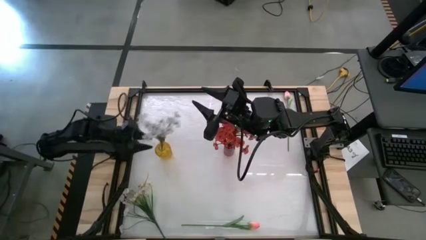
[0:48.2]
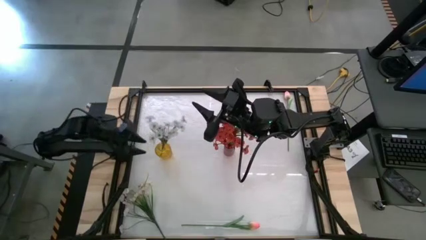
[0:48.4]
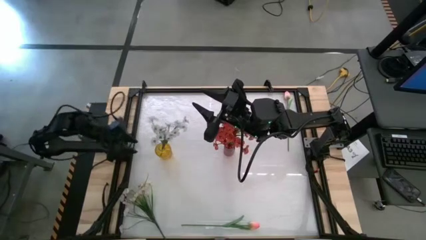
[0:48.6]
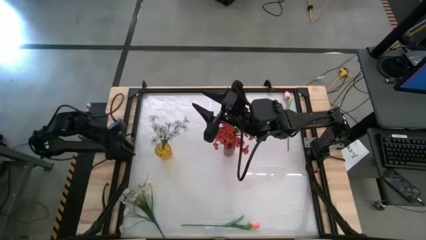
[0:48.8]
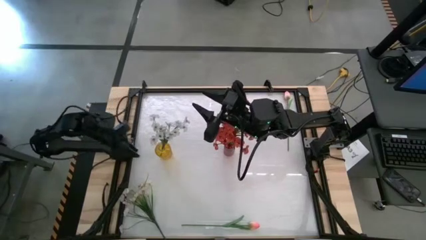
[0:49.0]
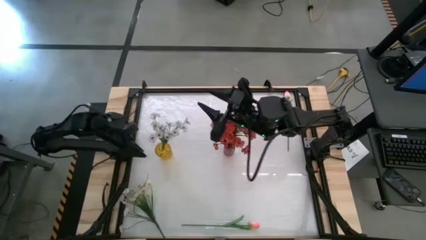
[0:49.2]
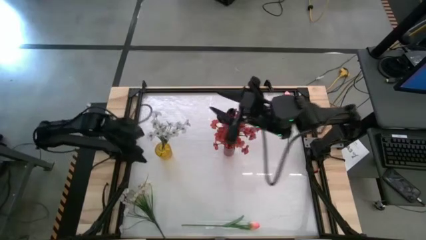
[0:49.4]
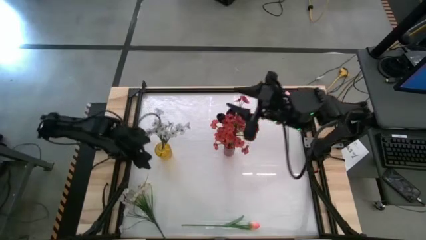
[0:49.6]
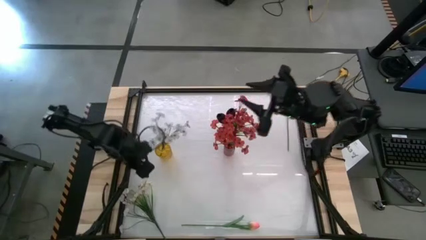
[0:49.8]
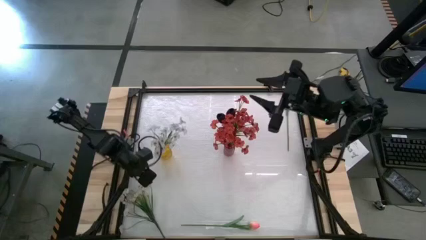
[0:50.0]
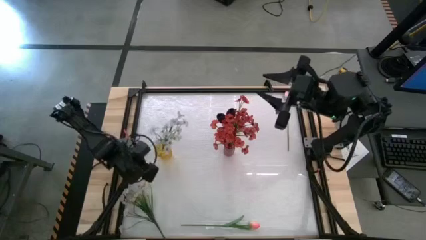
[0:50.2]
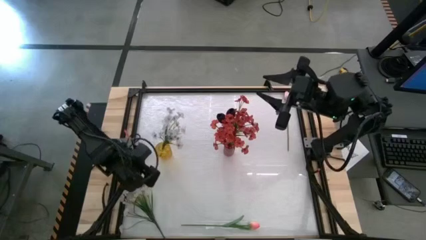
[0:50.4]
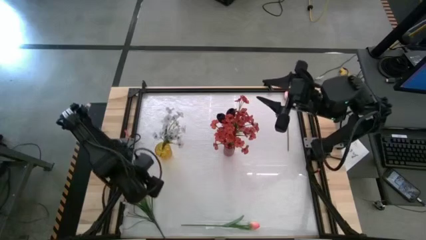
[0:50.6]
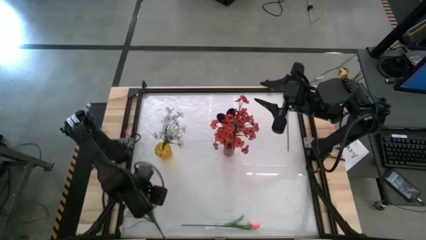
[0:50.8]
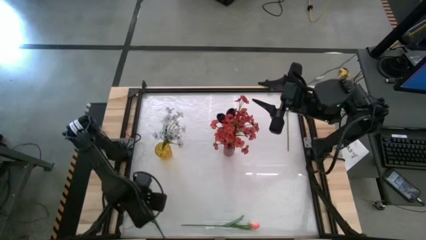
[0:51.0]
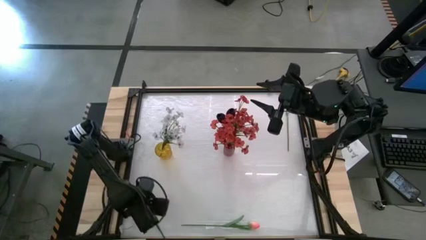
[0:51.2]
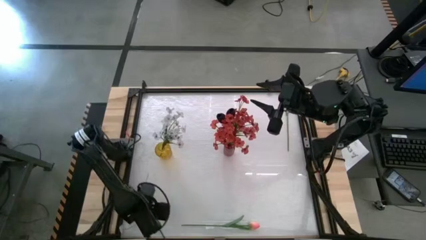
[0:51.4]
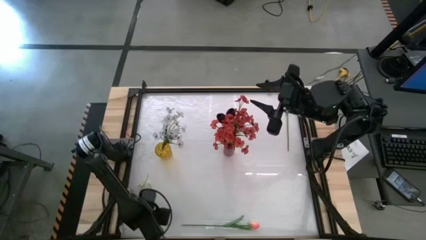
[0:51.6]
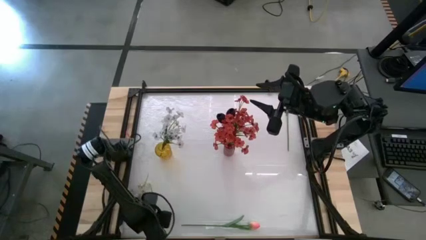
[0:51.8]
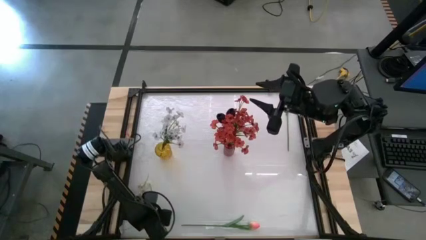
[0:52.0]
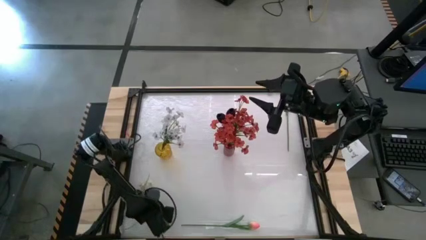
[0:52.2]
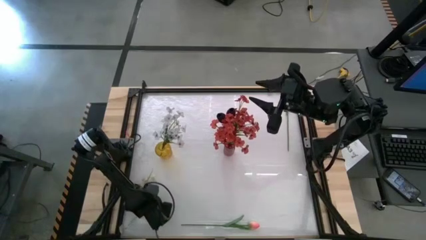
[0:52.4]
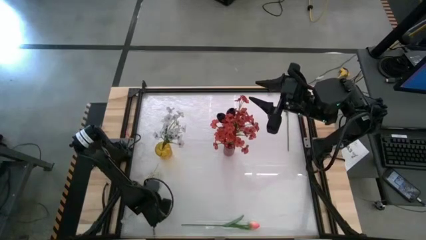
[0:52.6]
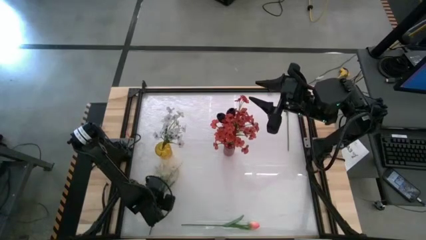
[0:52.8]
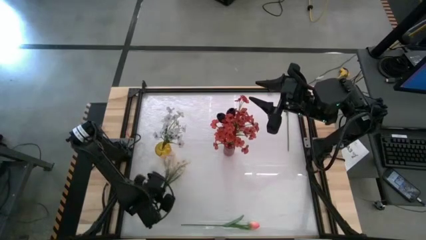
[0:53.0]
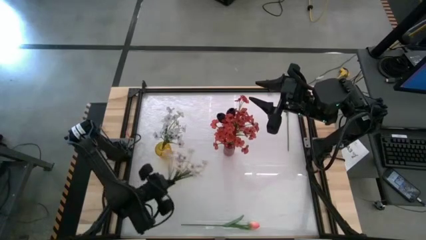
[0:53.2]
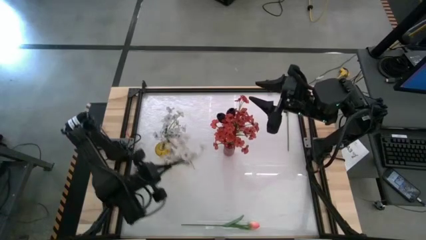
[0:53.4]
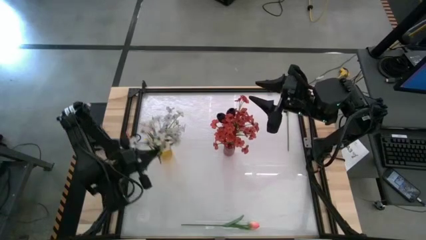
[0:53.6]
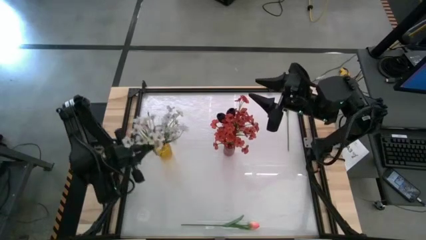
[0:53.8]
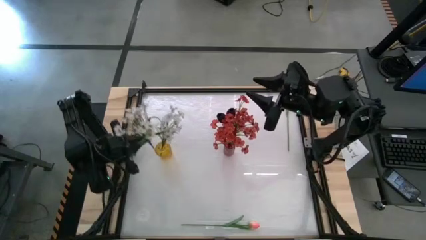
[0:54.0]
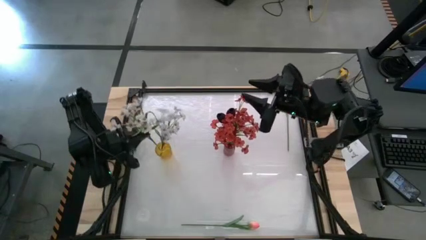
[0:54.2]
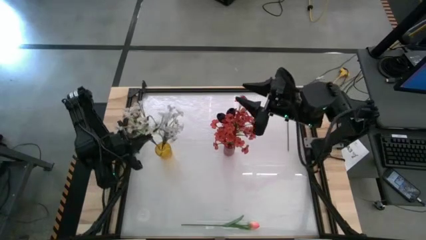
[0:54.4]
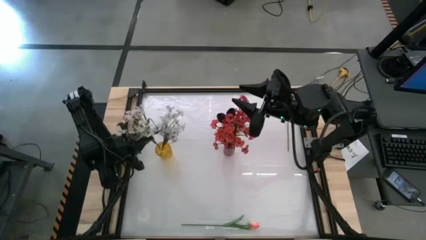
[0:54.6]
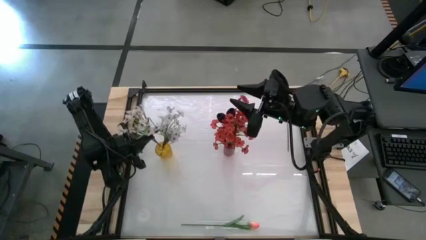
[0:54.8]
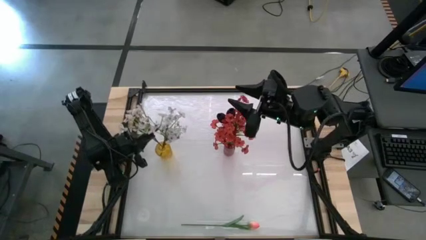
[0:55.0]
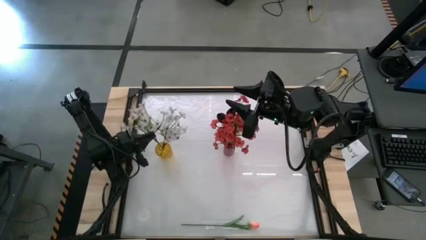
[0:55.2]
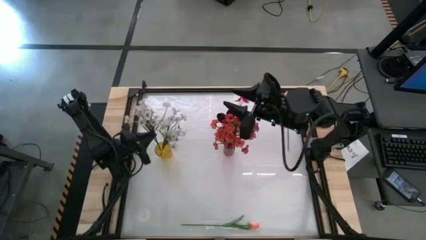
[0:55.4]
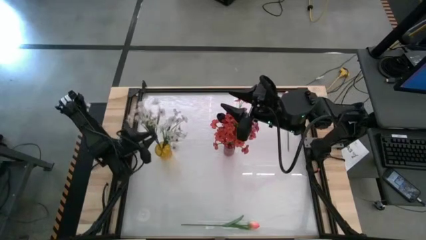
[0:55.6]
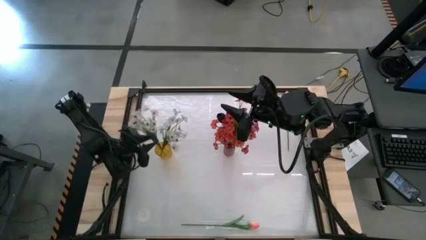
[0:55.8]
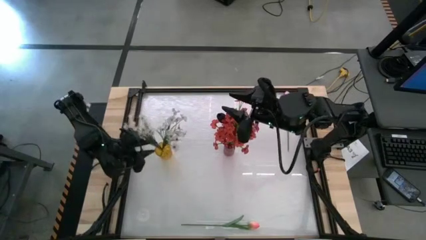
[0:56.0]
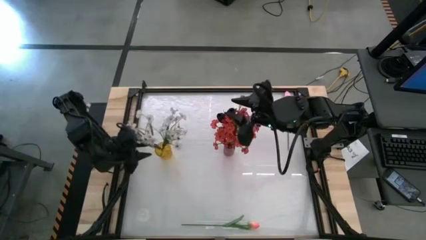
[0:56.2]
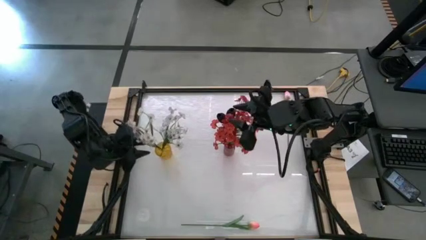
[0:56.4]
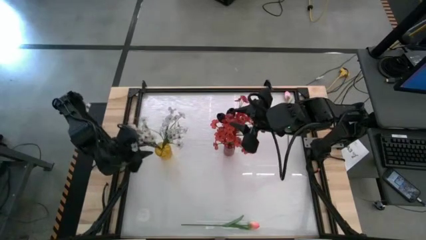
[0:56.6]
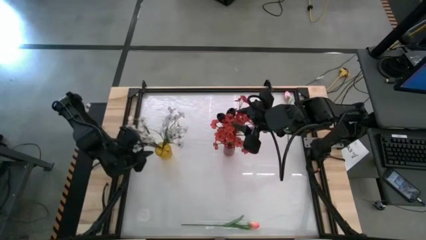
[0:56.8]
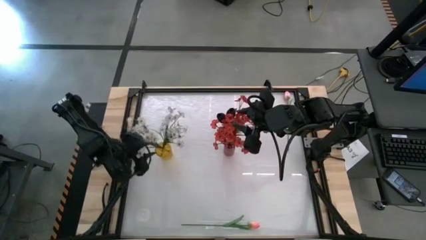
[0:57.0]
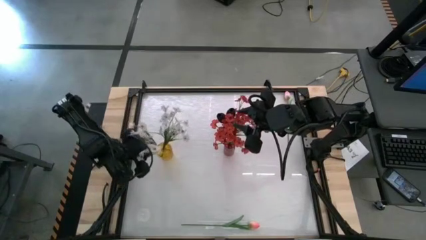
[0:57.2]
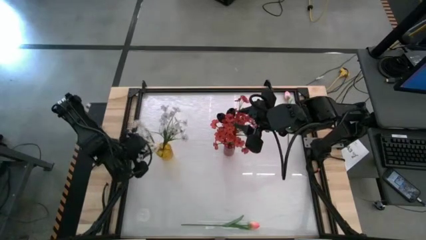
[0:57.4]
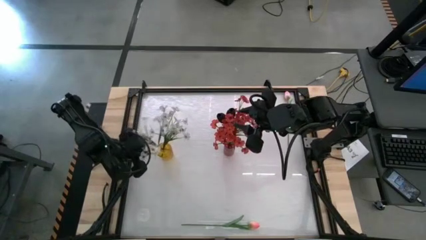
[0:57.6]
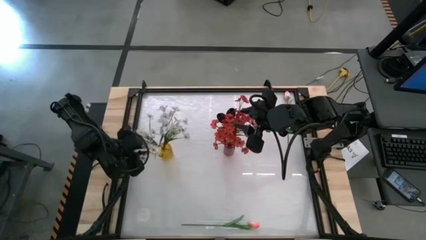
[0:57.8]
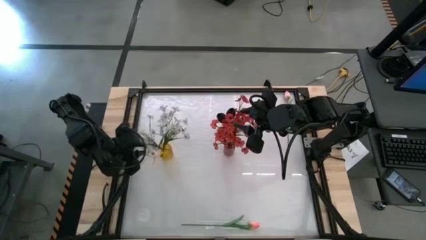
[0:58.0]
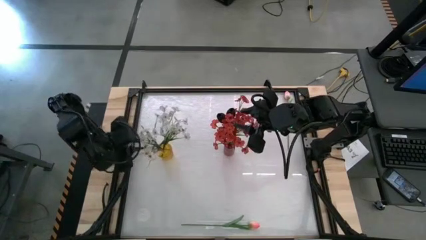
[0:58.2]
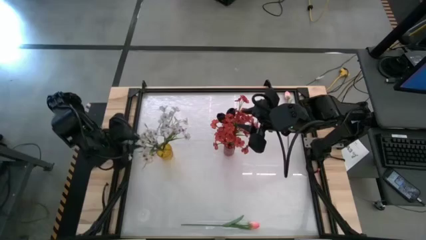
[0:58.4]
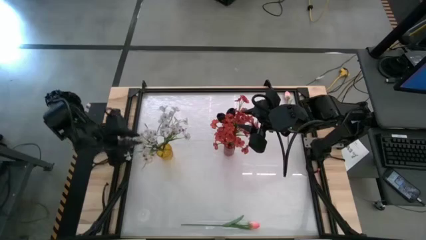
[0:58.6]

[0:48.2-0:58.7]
Task: Sort flowers into vase by color
Put the white flowers into the yellow vase

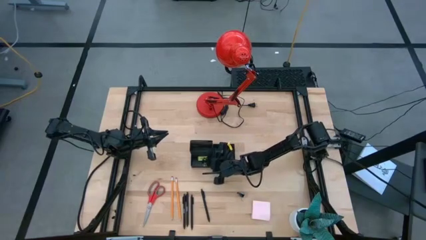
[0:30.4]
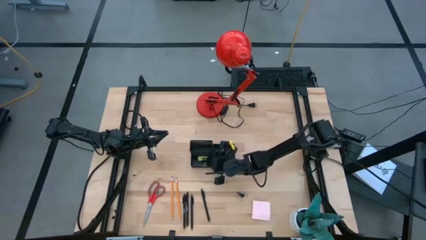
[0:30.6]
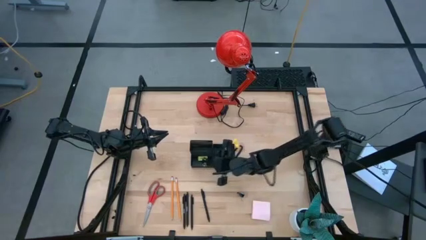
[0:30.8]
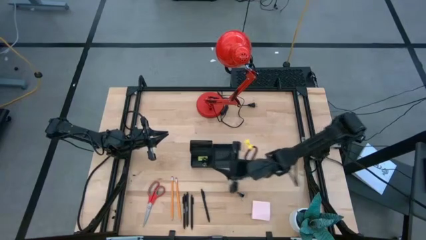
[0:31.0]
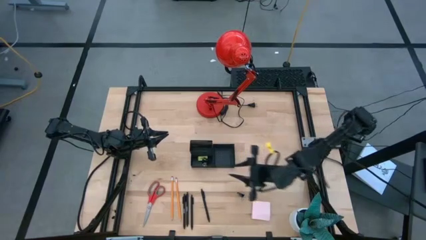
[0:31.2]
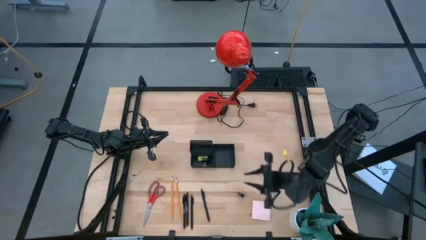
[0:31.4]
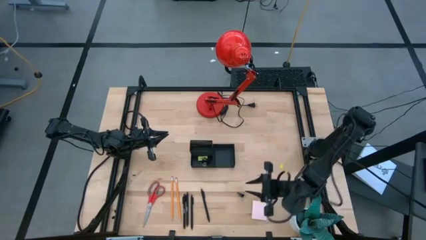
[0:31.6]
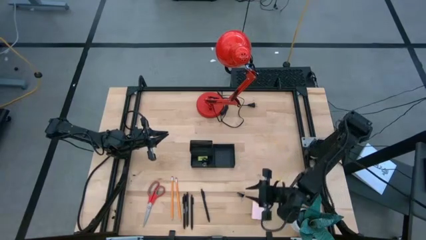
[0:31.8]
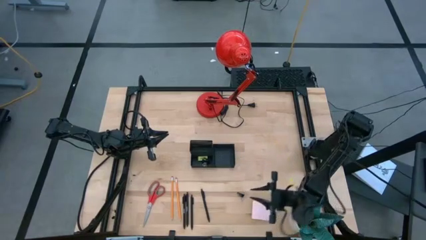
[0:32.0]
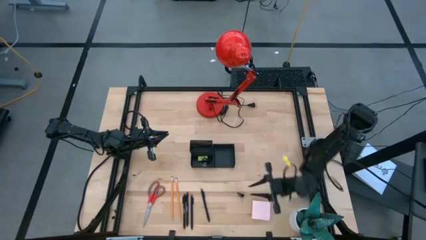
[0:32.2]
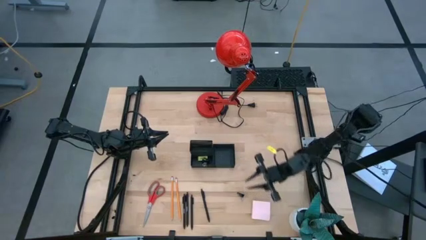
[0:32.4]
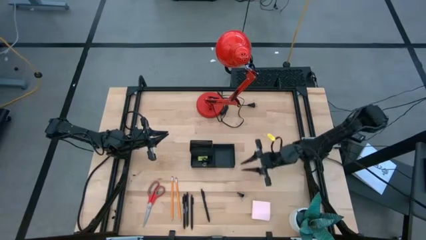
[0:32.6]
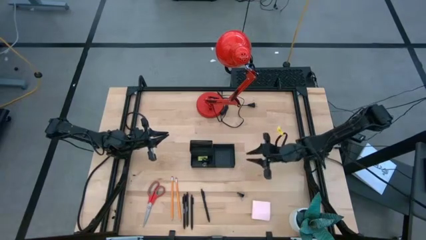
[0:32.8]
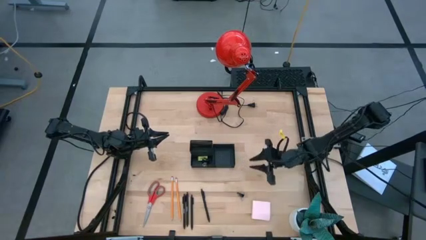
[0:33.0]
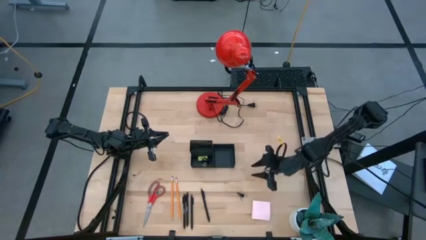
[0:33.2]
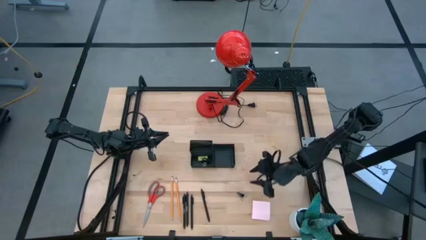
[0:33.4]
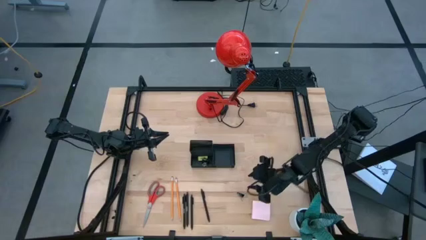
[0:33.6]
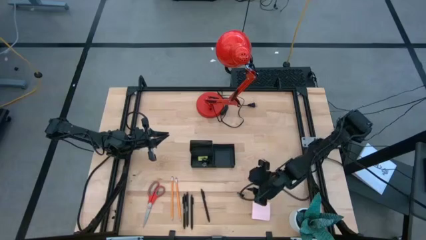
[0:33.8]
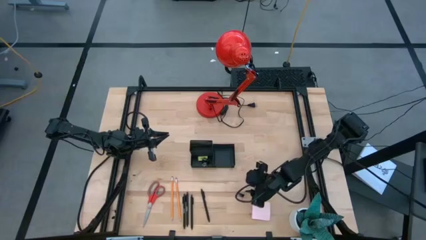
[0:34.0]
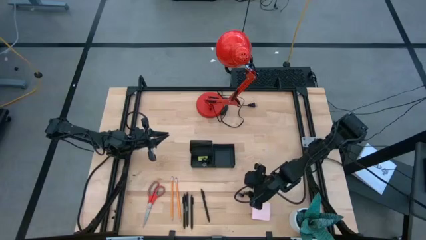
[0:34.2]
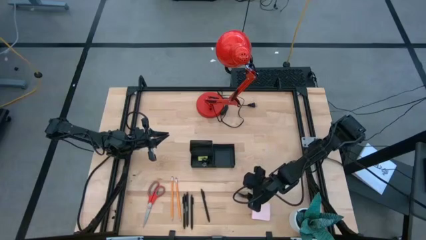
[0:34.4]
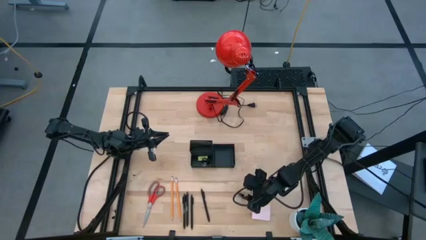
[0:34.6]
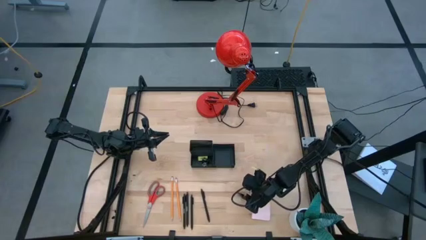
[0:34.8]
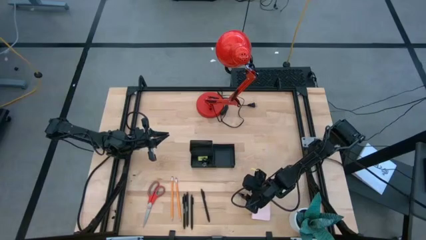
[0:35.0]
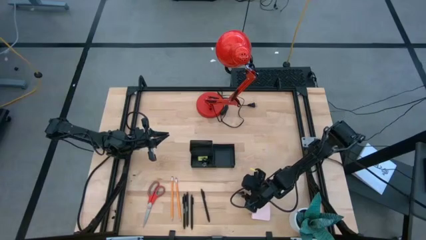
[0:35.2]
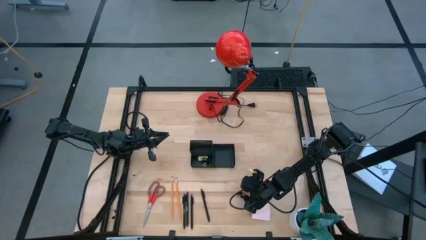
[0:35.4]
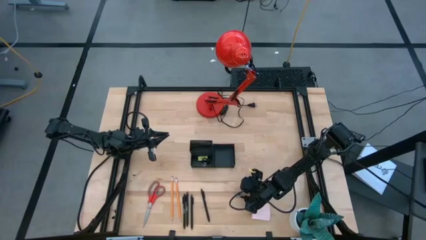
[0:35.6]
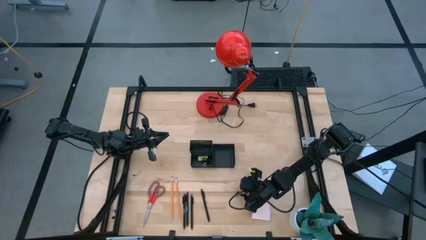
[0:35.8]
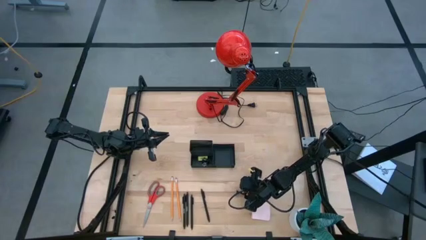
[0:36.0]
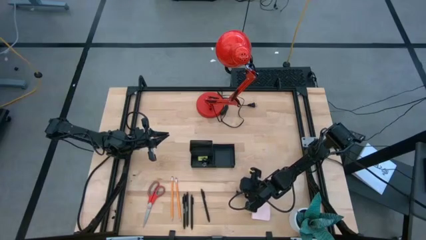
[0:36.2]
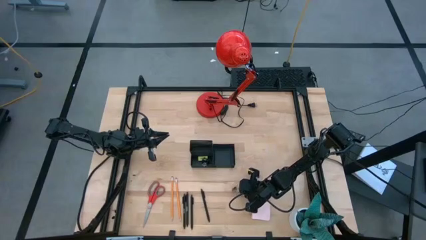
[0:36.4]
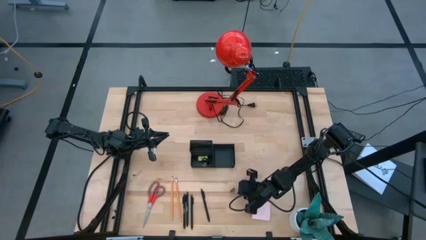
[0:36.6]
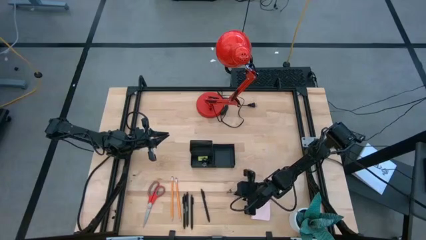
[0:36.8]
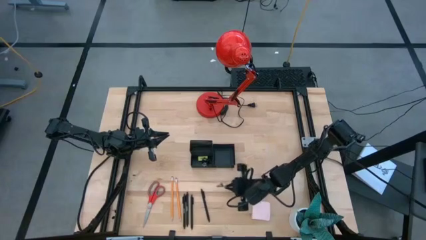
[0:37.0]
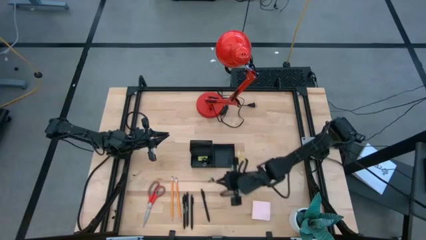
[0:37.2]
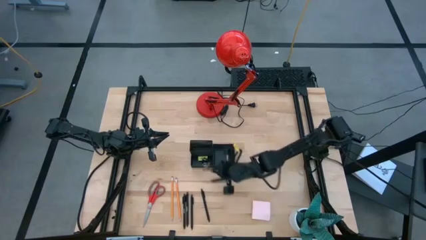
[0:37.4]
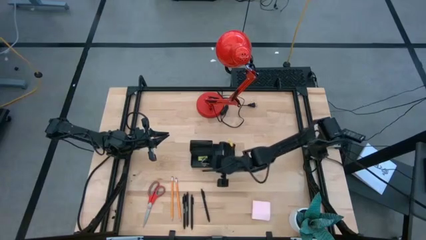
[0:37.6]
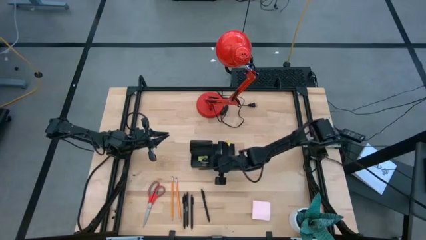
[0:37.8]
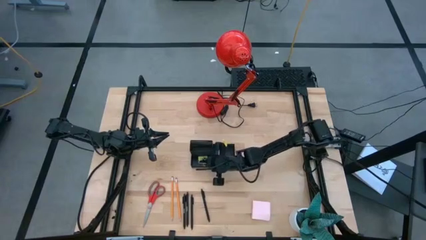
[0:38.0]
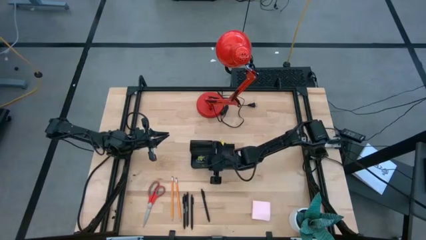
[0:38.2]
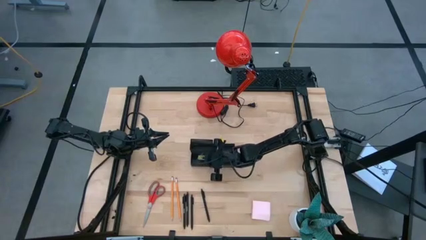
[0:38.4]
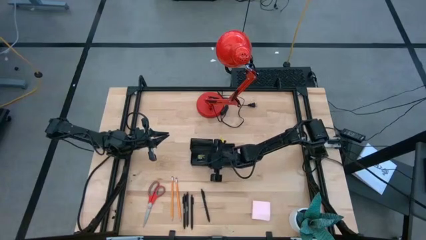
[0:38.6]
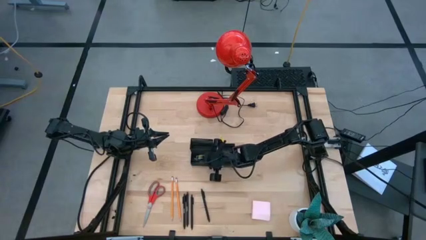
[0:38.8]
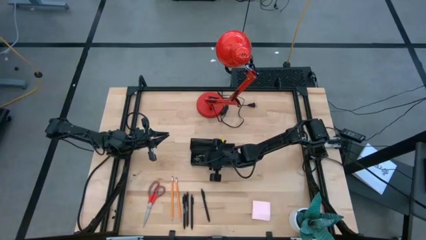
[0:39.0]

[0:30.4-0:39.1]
Task: Pick and place office supplies into organizer
Put the black binder clip into the black mesh desk organizer
